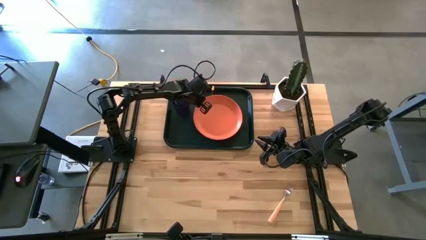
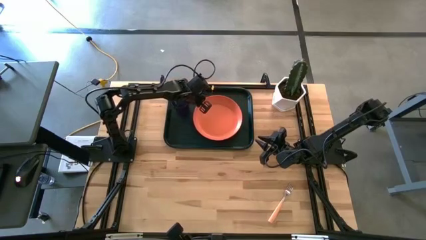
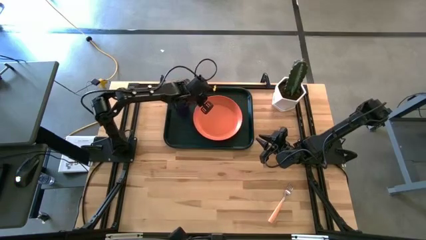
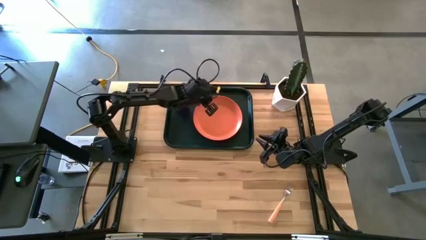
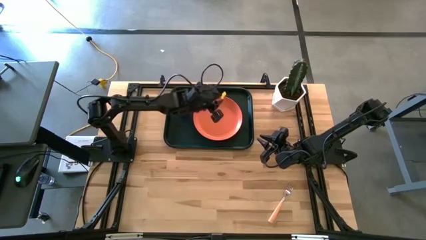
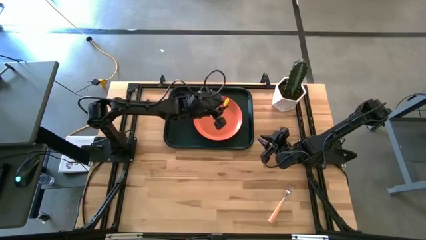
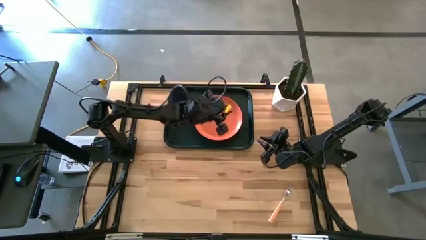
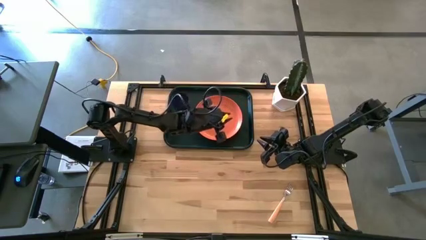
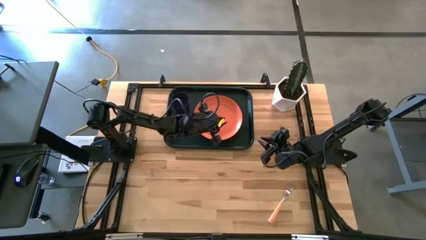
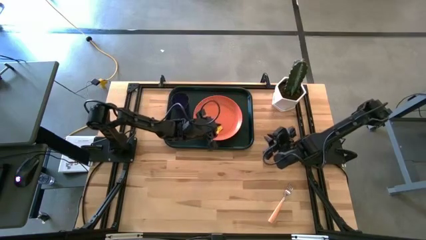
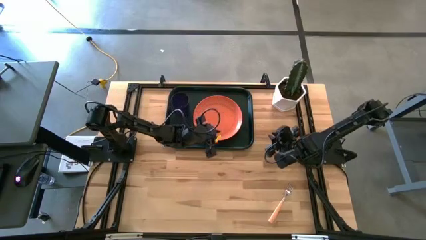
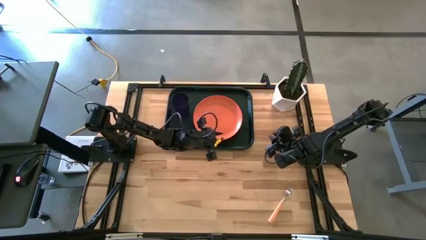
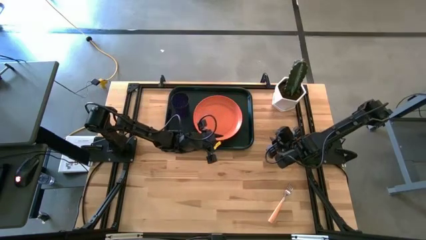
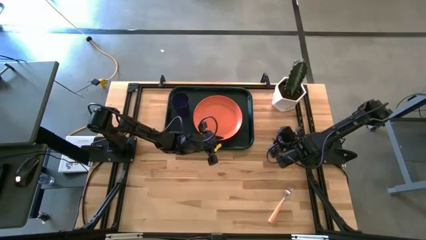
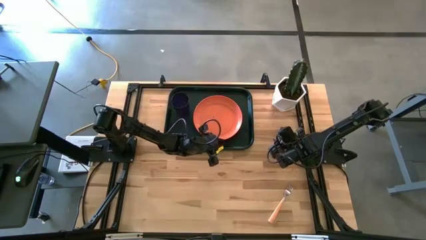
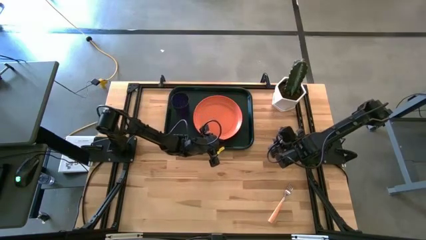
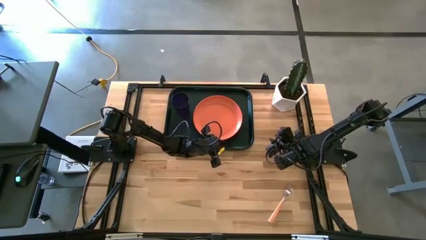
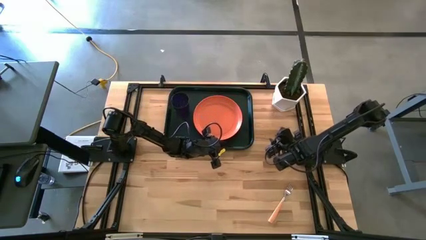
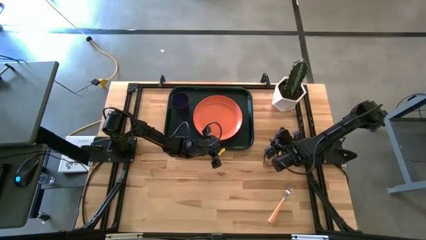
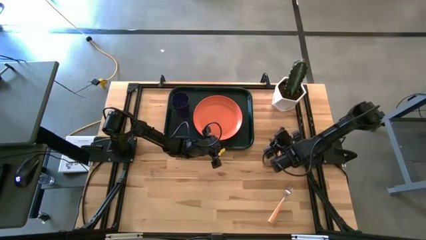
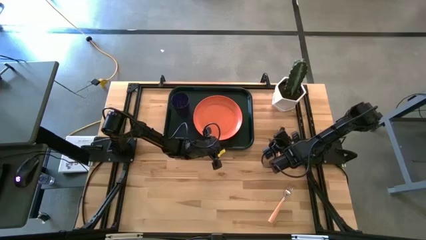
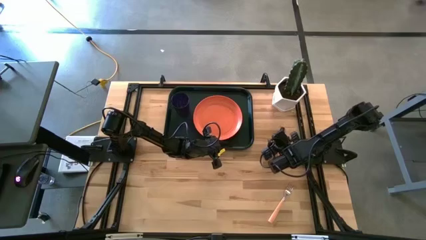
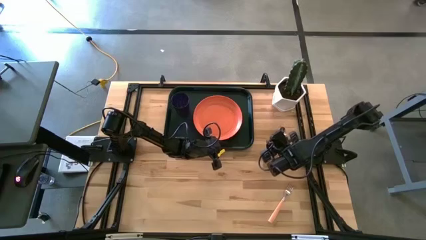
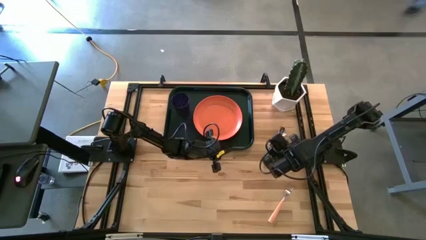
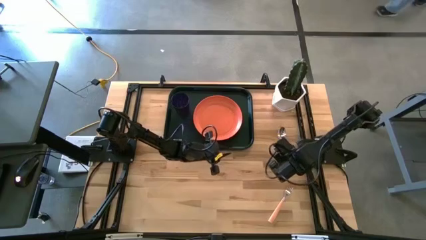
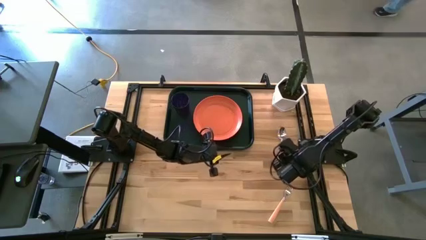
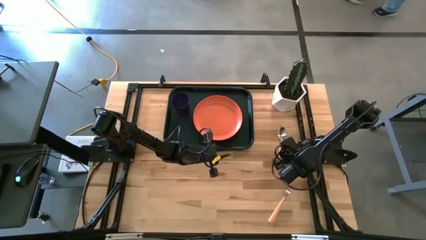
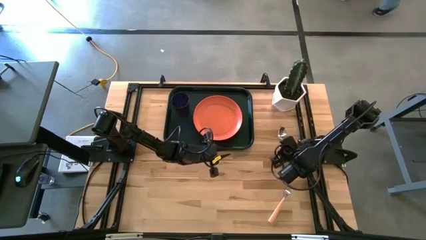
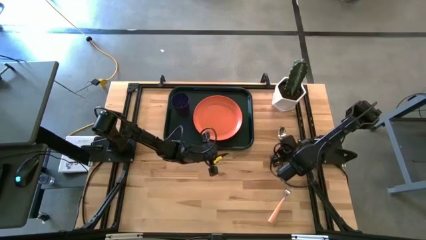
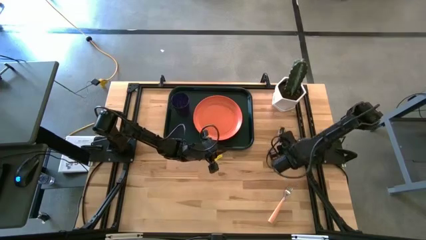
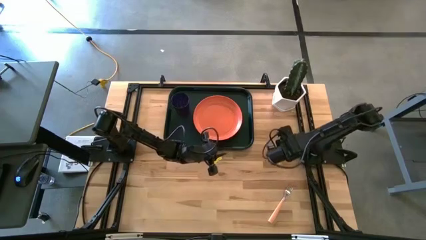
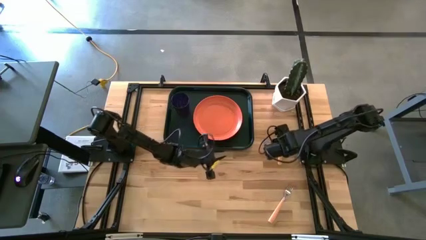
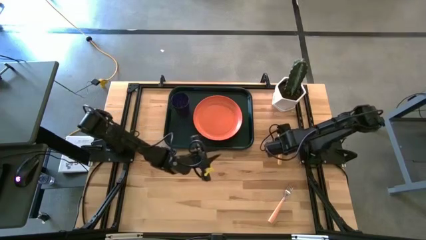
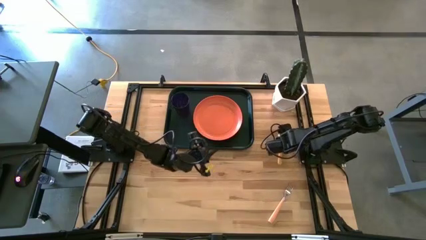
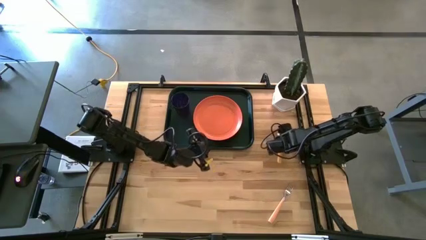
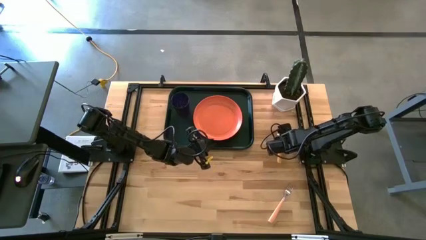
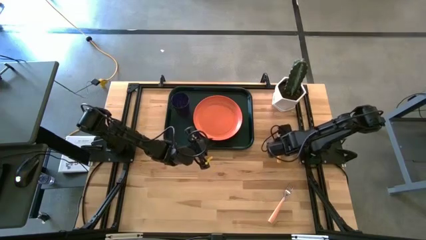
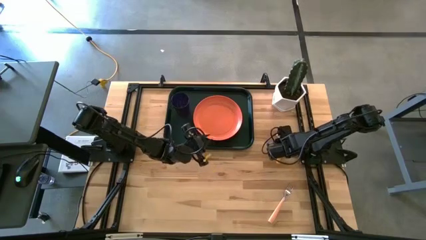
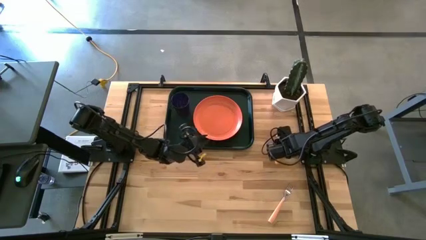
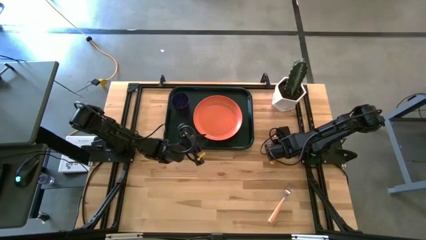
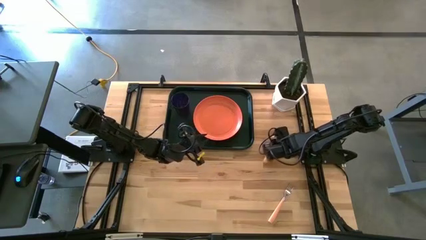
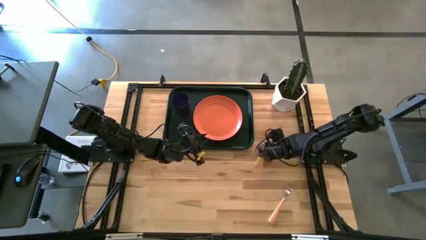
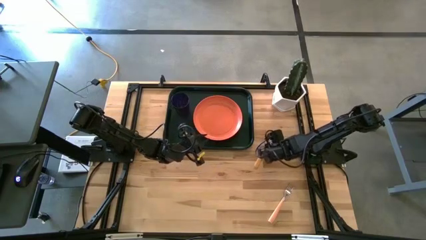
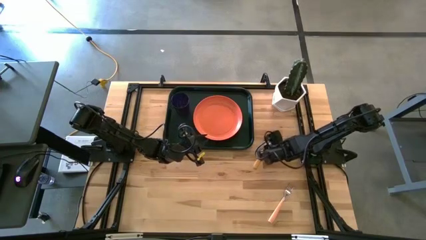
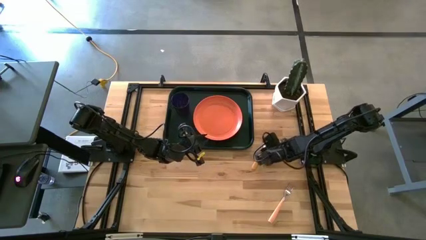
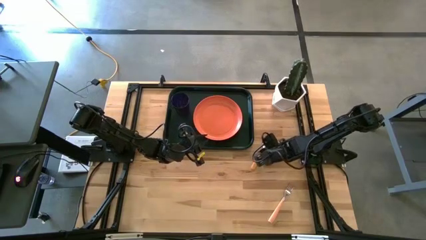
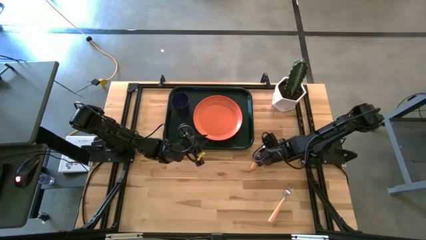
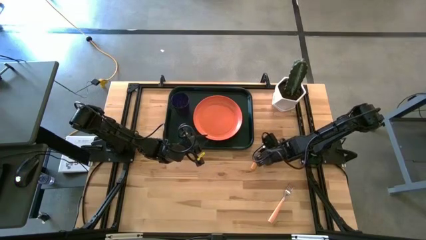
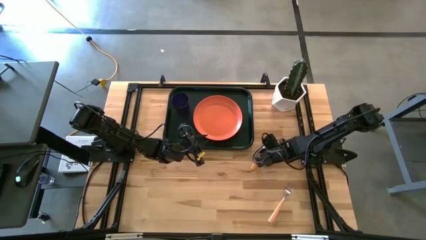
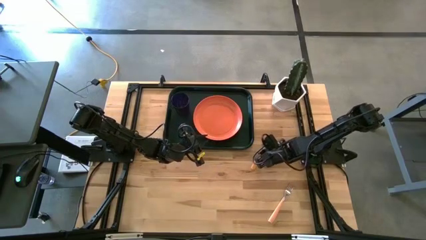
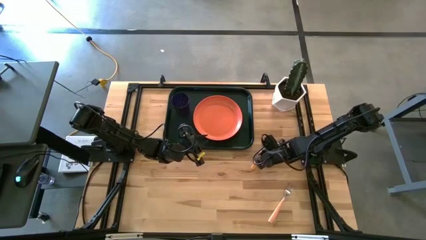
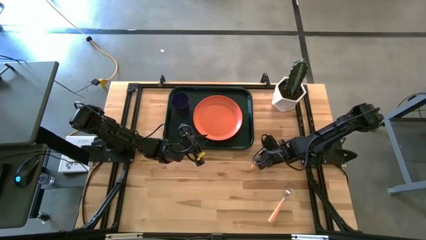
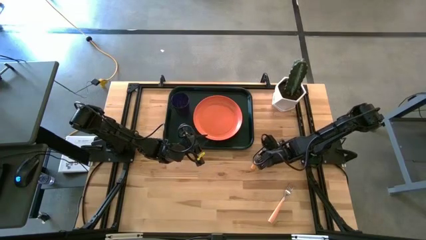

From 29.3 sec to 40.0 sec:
Task: Pick and place plate/cup/fork/spoon on tray
Put the spoon into the left side of the serving tray

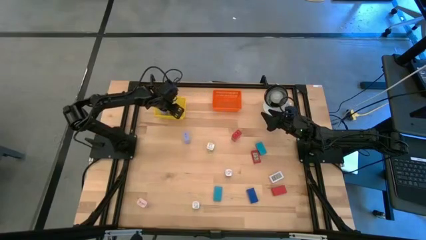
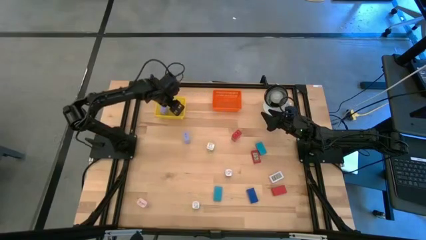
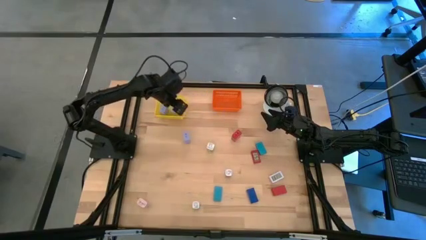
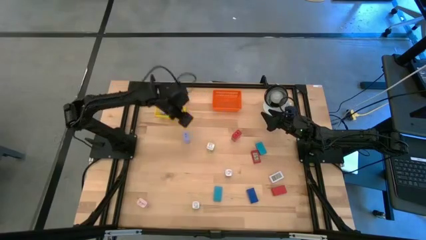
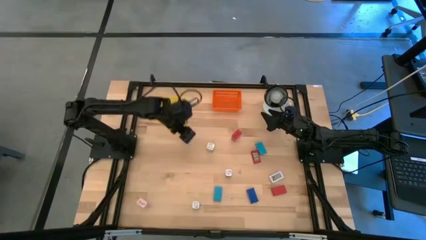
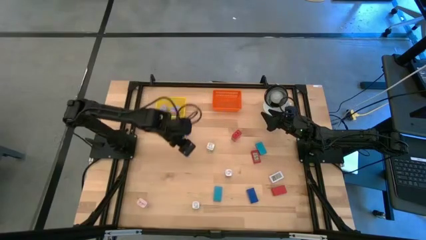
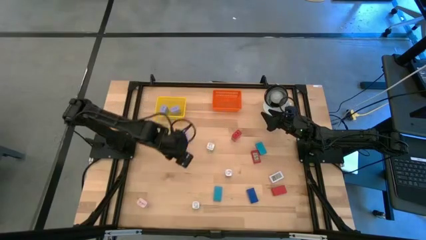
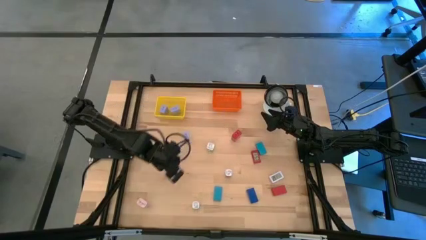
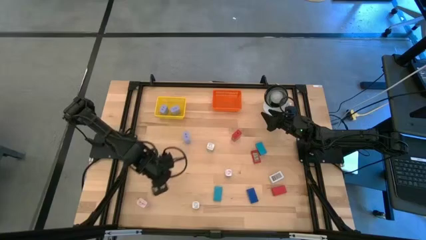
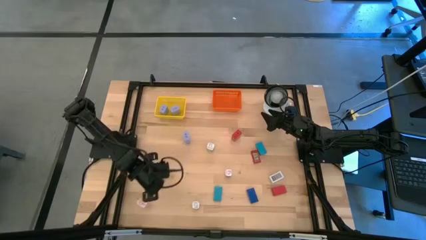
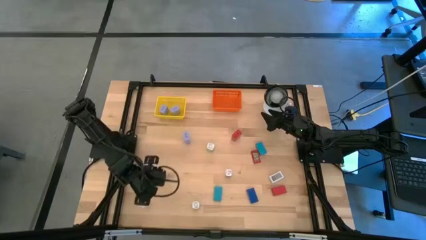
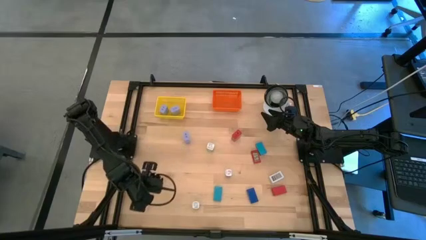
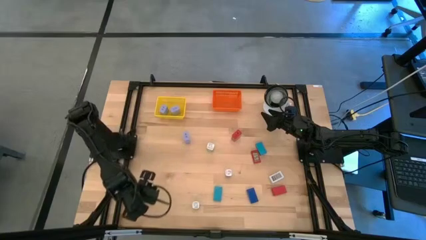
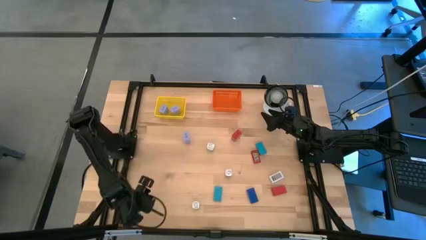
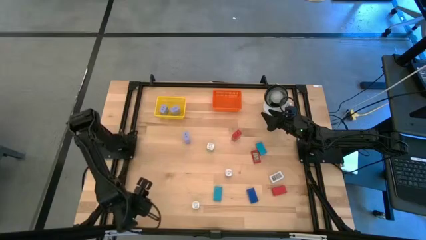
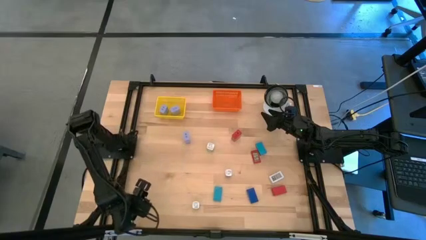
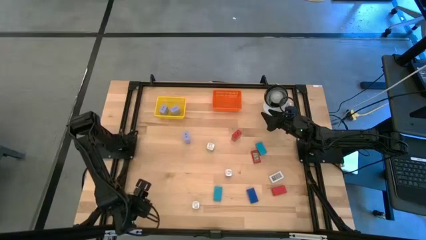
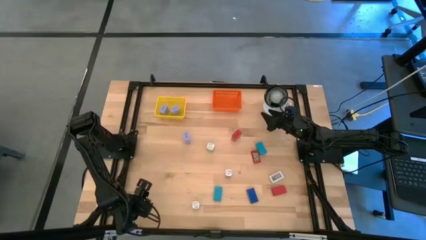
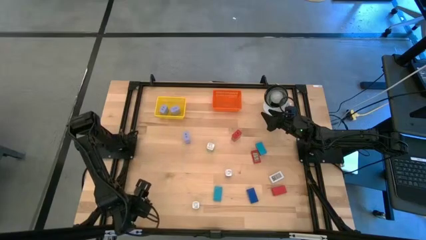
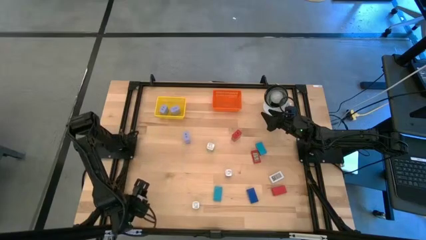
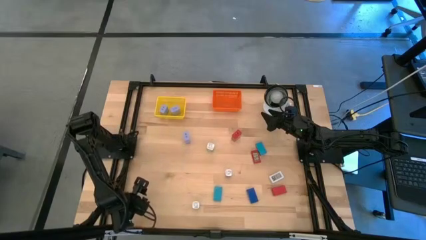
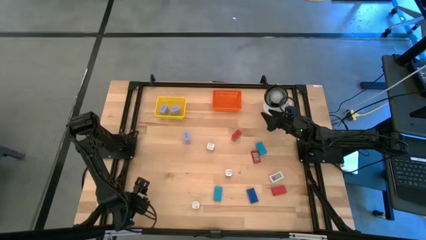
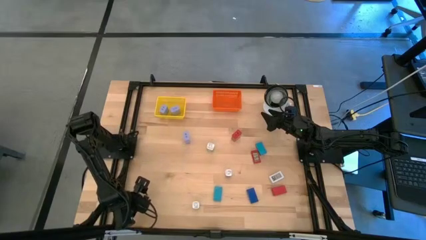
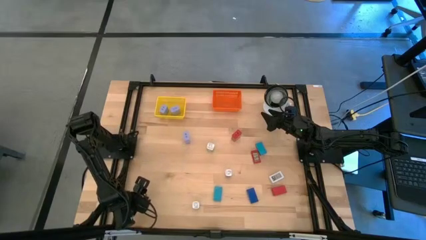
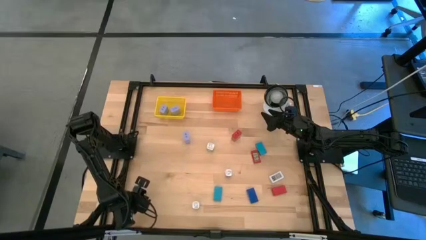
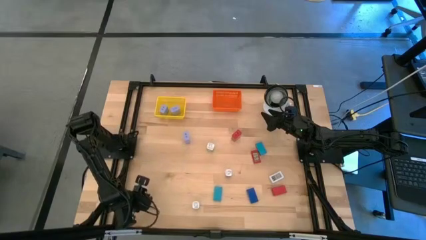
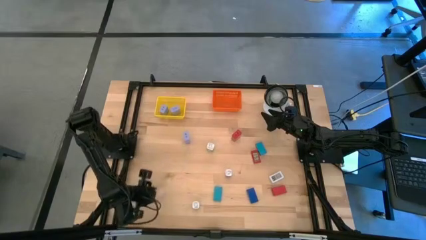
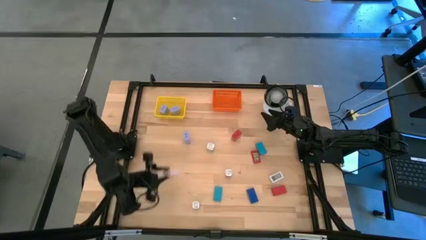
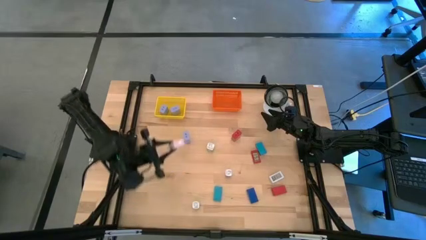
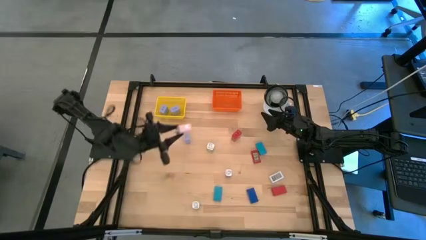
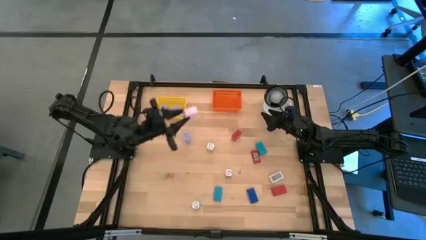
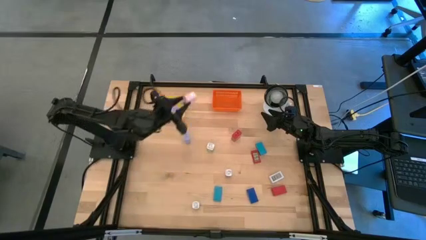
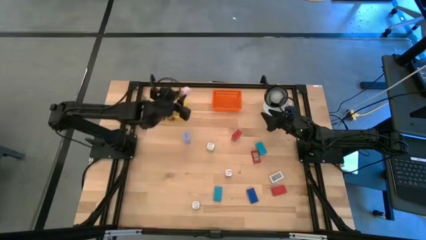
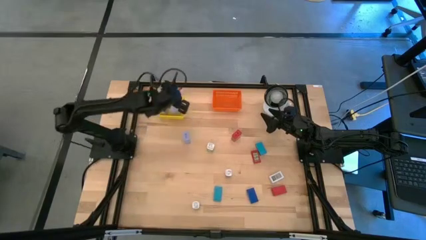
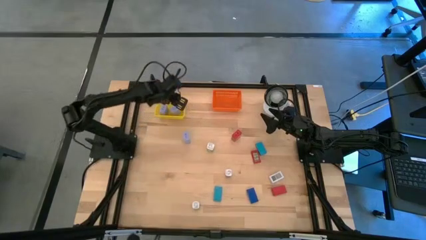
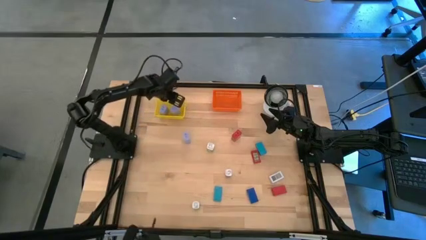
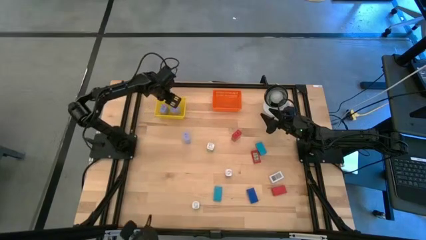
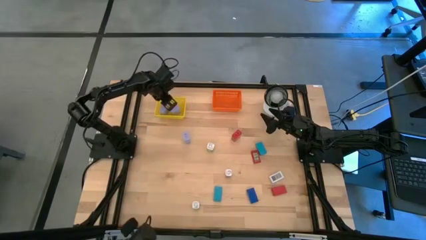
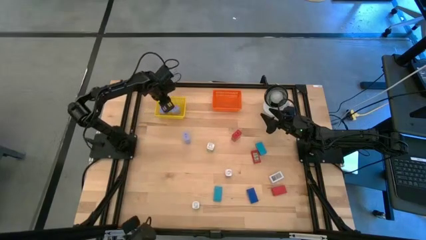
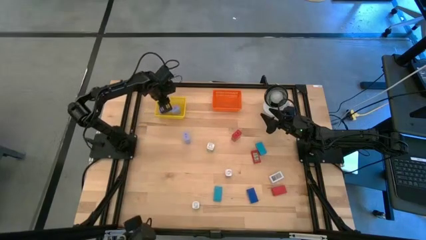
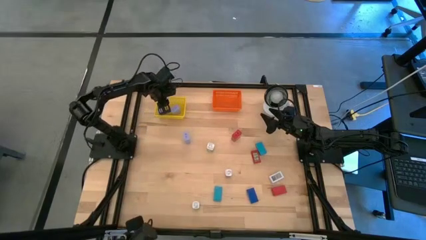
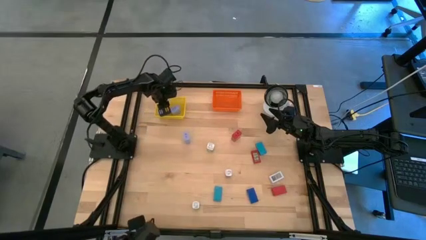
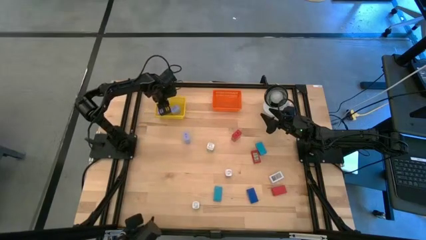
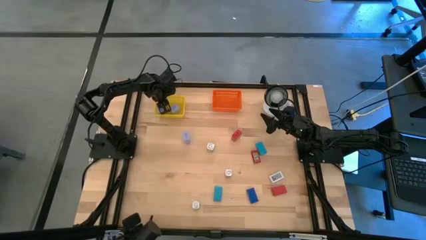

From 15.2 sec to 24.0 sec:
Task: Pick & Place Office items
Put the pink changer adapter into the yellow bin
